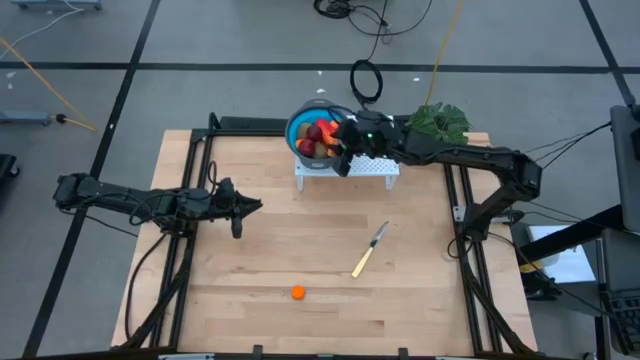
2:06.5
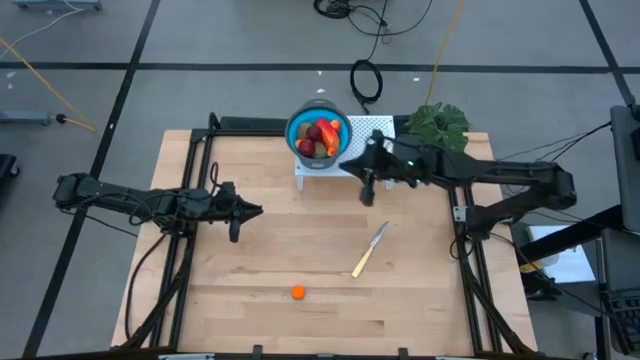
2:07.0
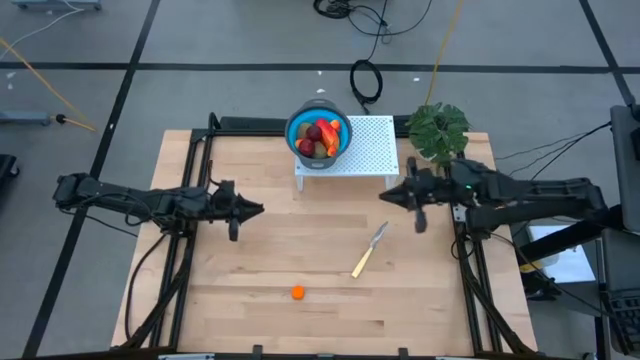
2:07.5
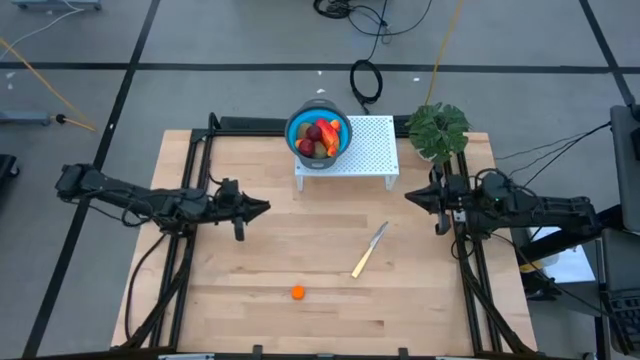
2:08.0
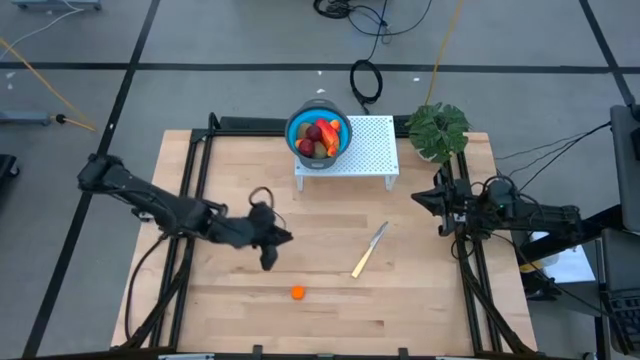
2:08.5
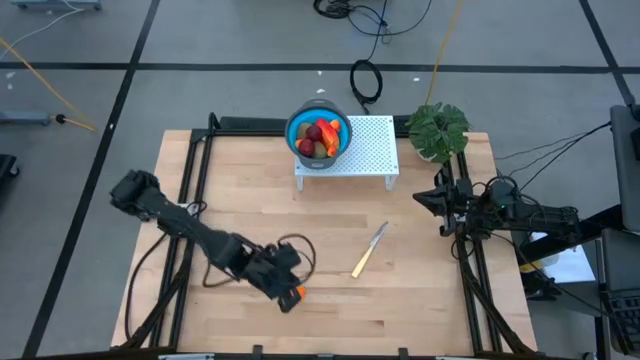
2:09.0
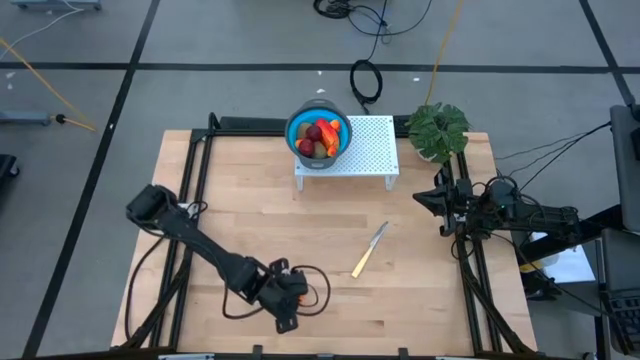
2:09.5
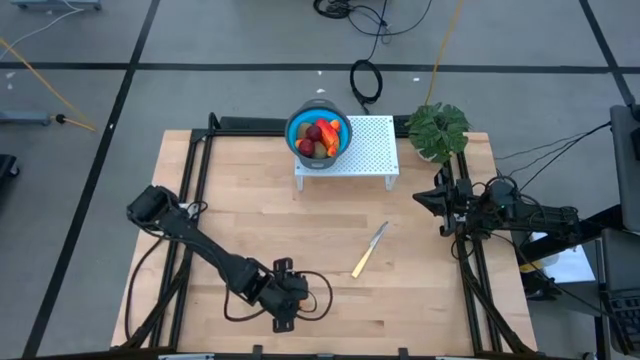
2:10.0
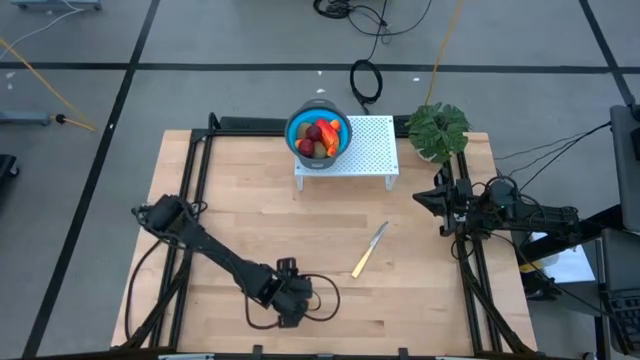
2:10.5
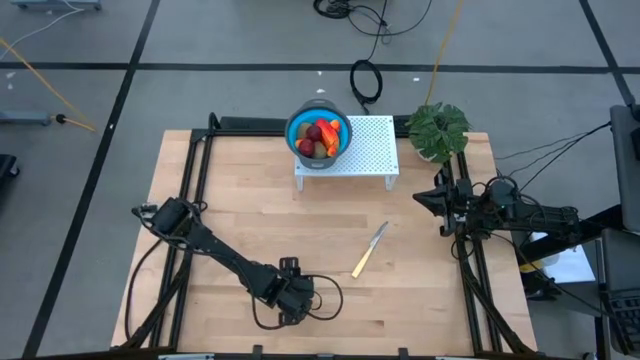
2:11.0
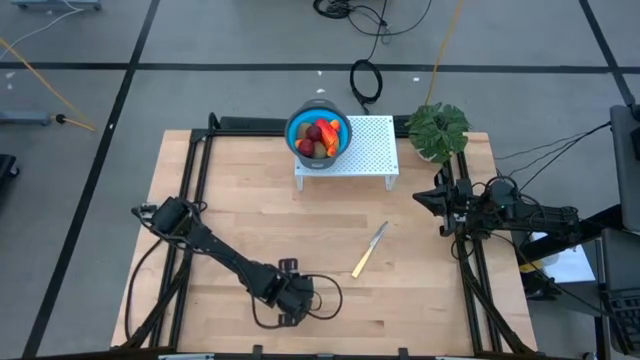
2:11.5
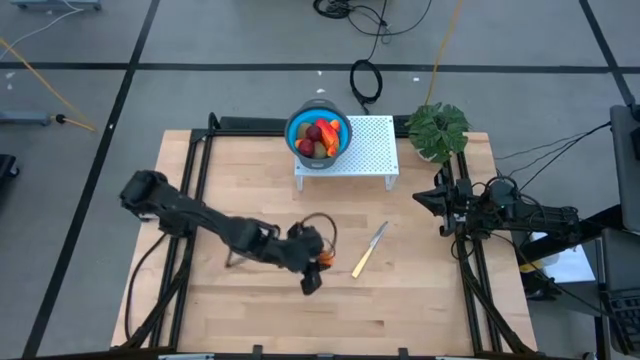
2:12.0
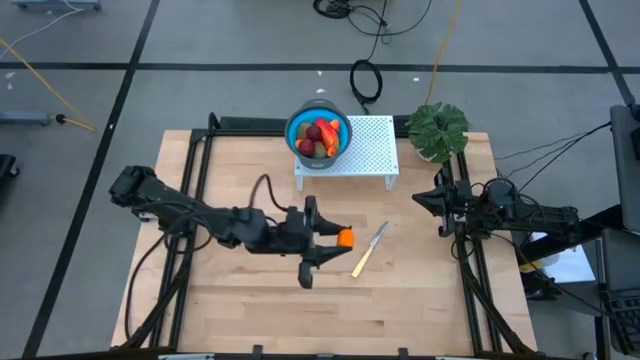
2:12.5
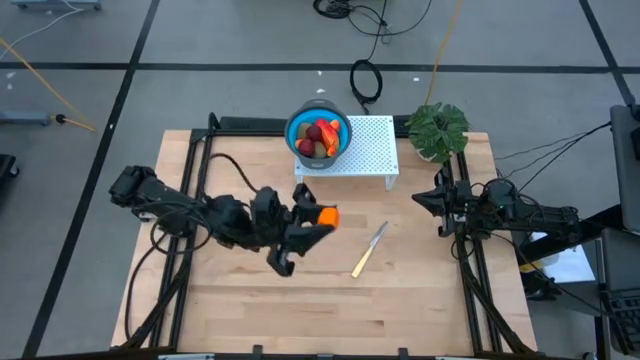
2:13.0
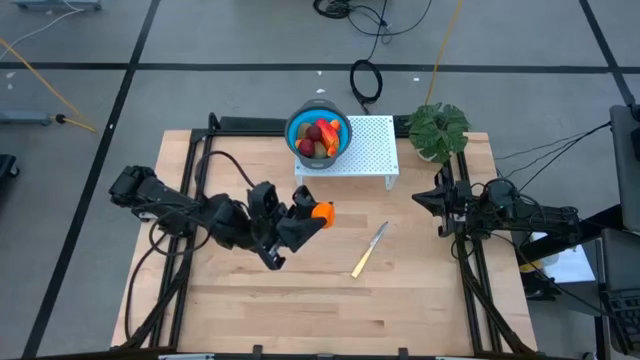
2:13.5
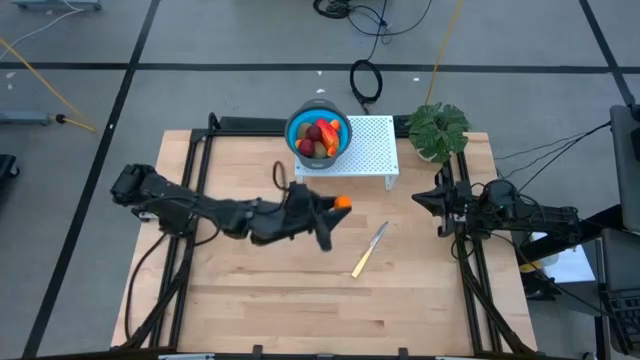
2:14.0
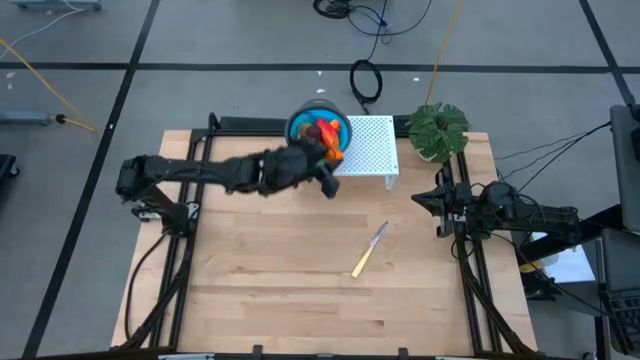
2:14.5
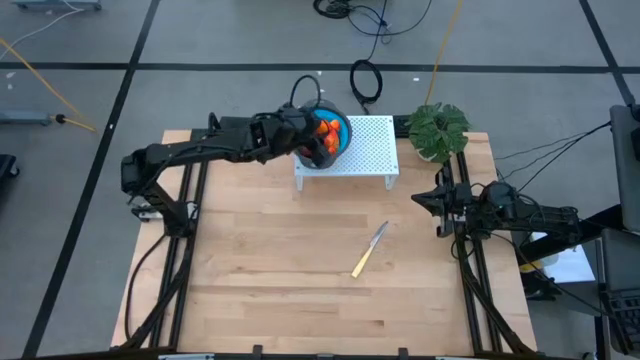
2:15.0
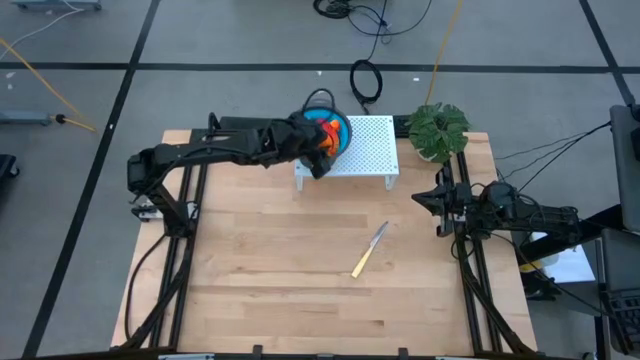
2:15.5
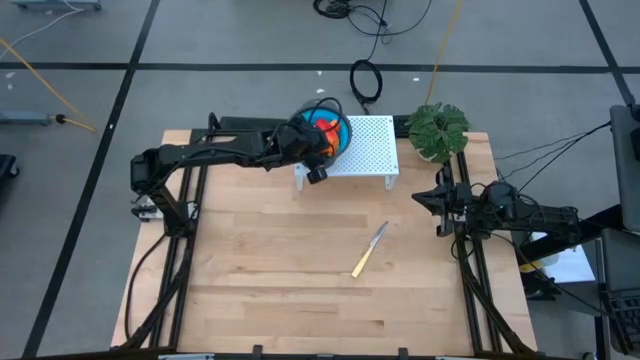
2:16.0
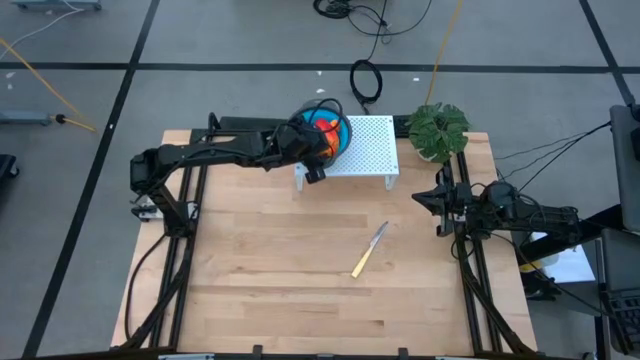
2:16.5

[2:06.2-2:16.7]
Task: Pick & Place Fruit
Put the orange into the blue strainer bowl on the shelf

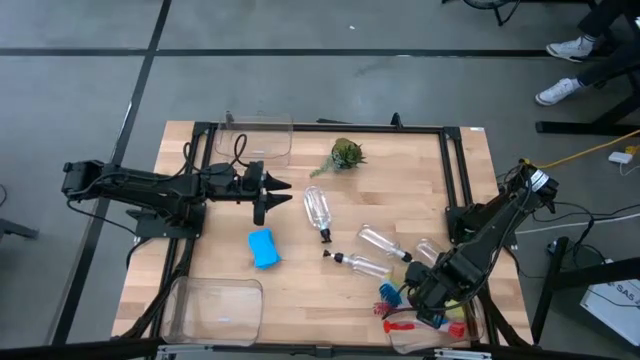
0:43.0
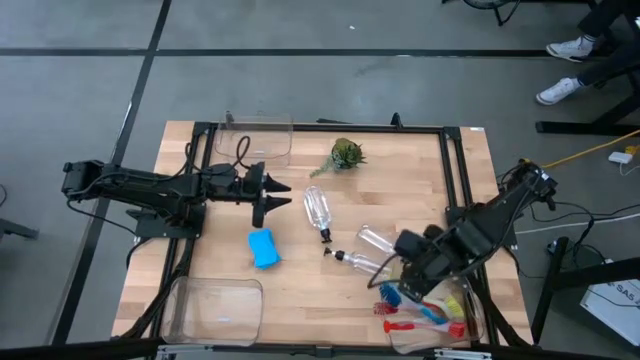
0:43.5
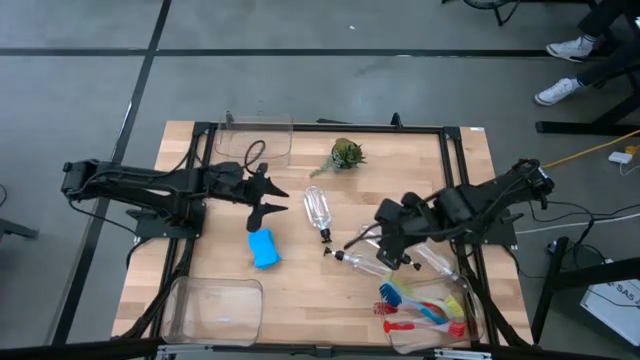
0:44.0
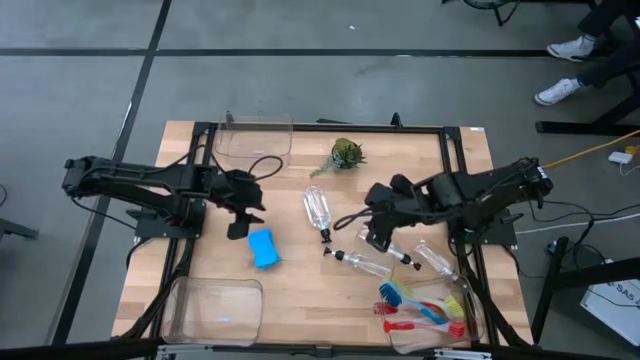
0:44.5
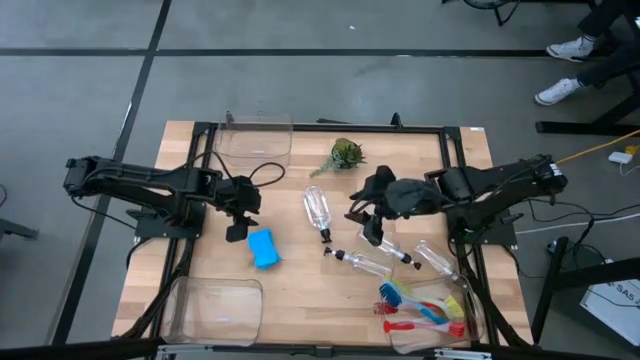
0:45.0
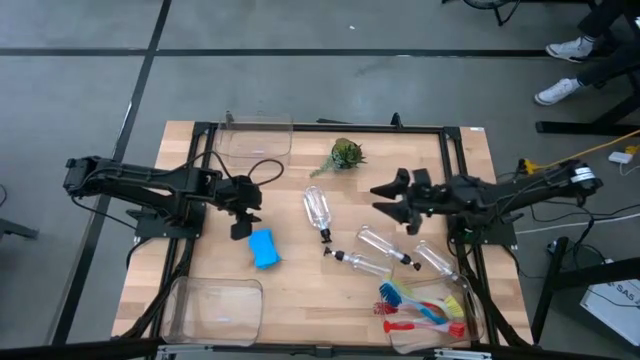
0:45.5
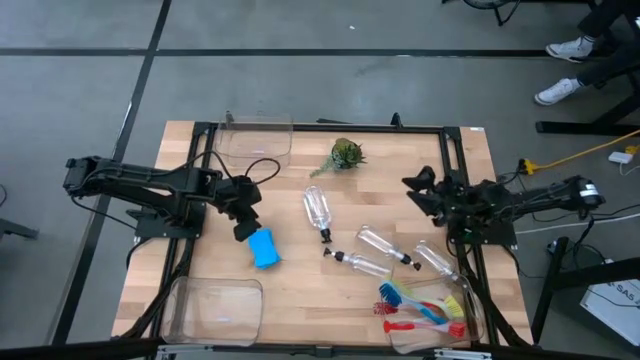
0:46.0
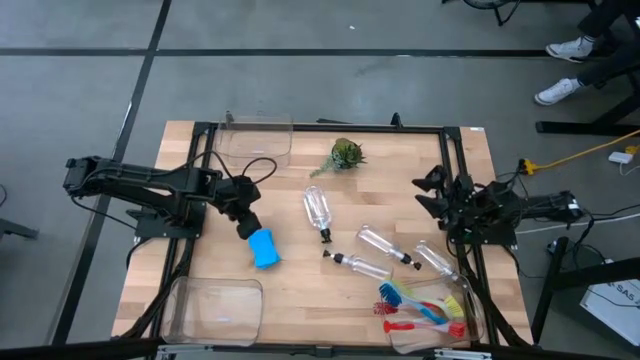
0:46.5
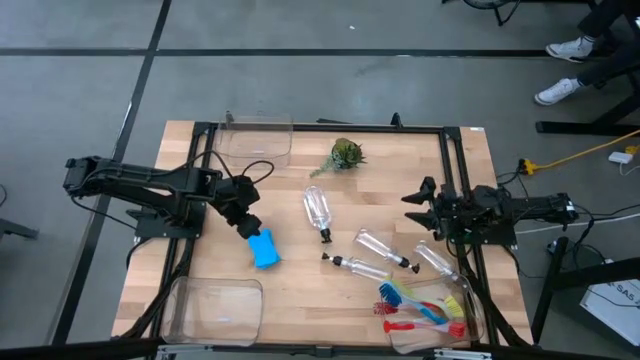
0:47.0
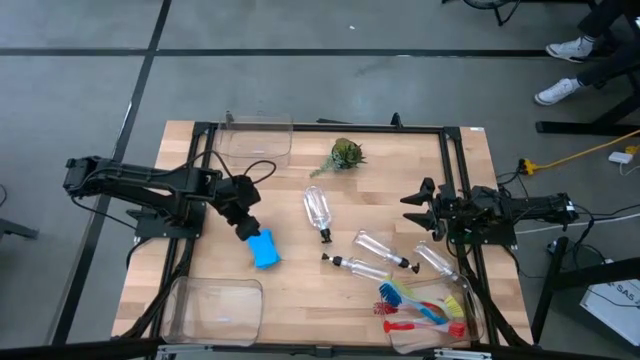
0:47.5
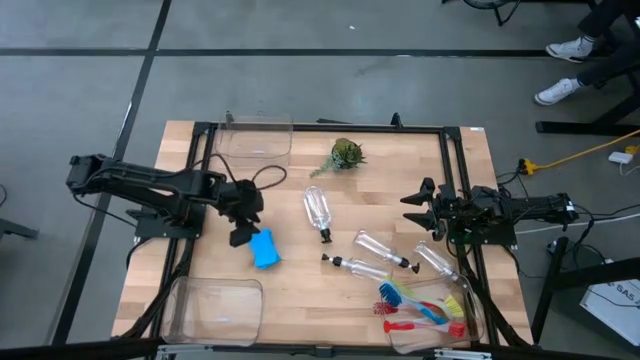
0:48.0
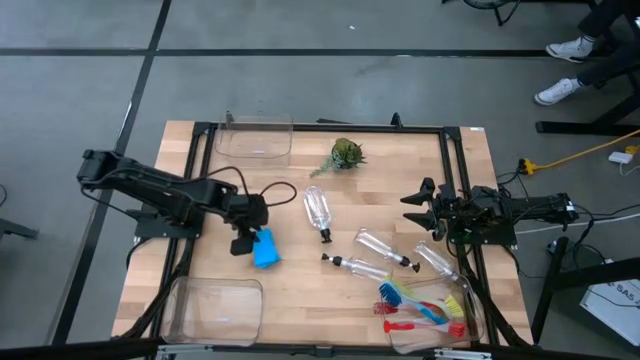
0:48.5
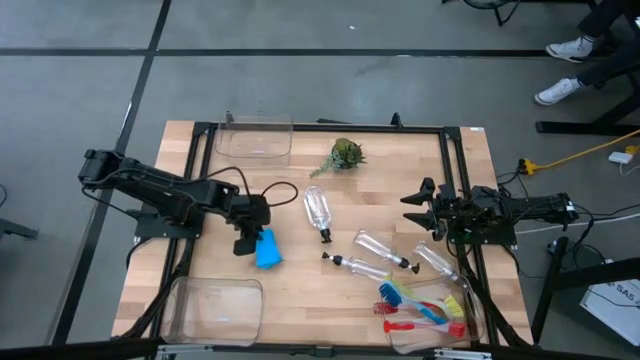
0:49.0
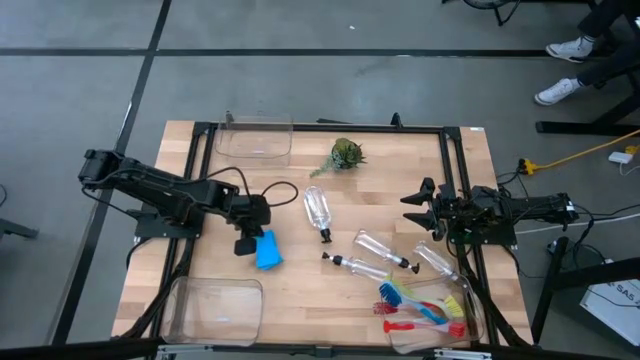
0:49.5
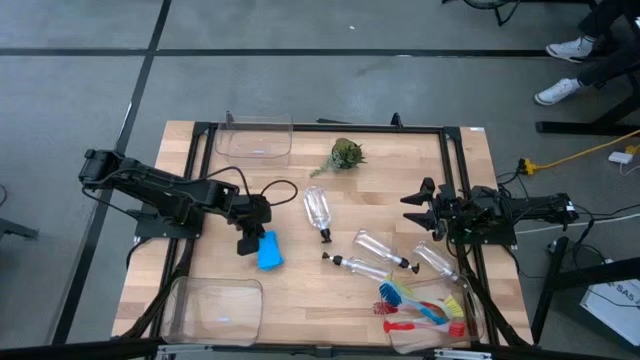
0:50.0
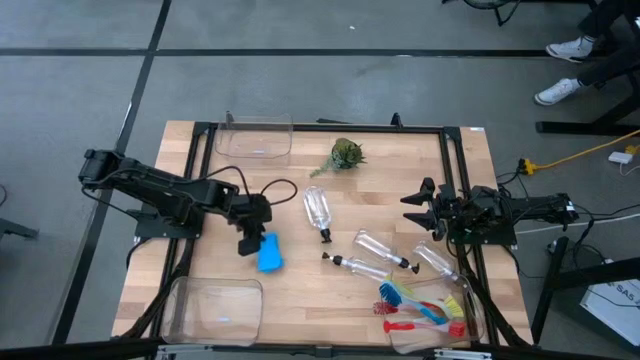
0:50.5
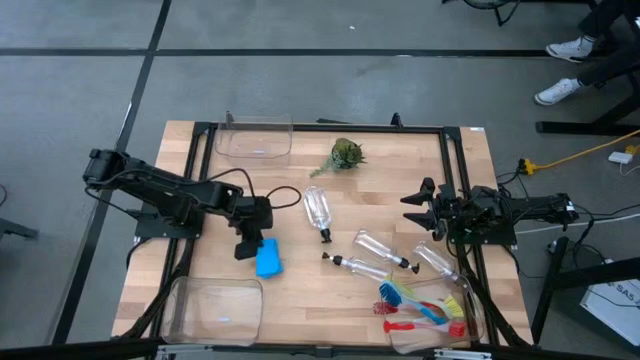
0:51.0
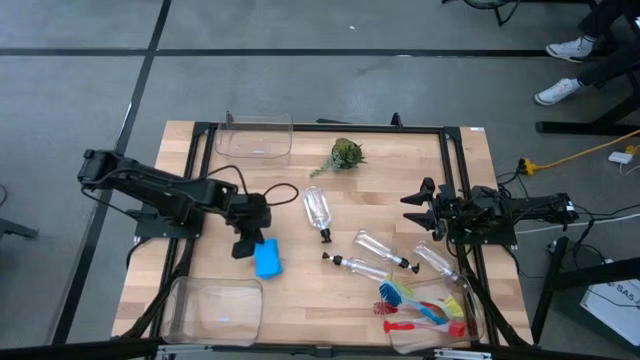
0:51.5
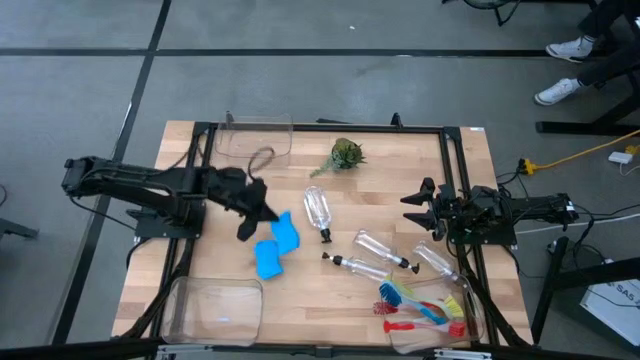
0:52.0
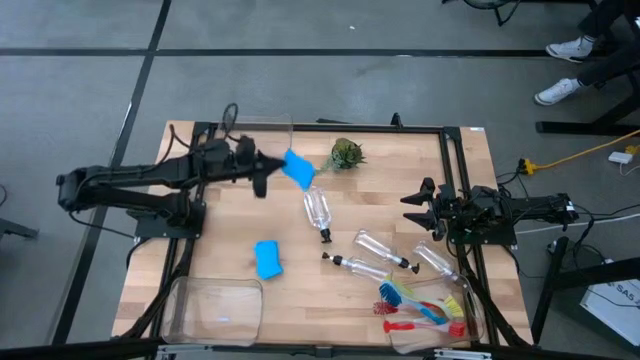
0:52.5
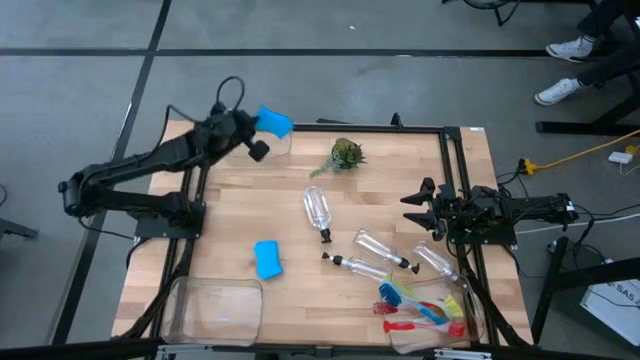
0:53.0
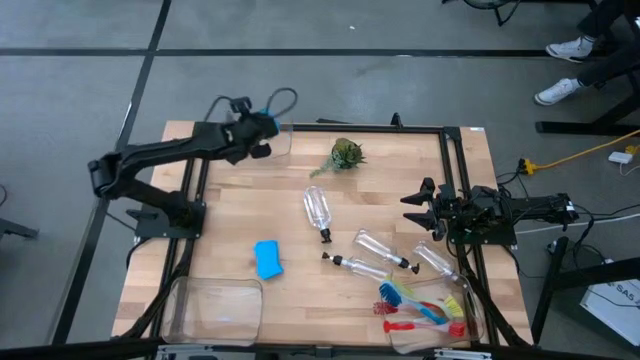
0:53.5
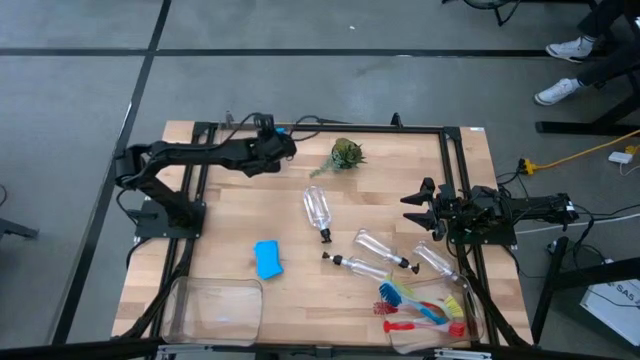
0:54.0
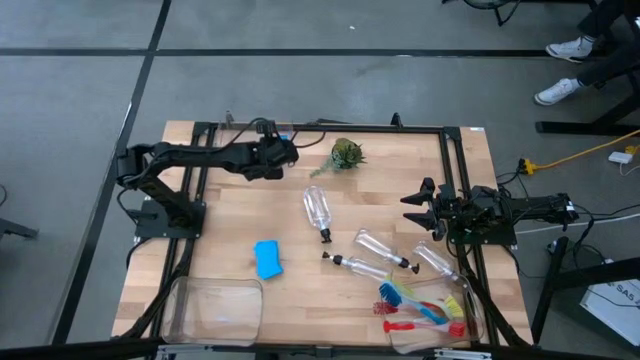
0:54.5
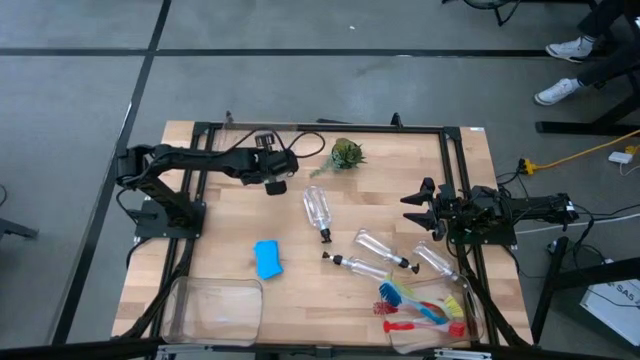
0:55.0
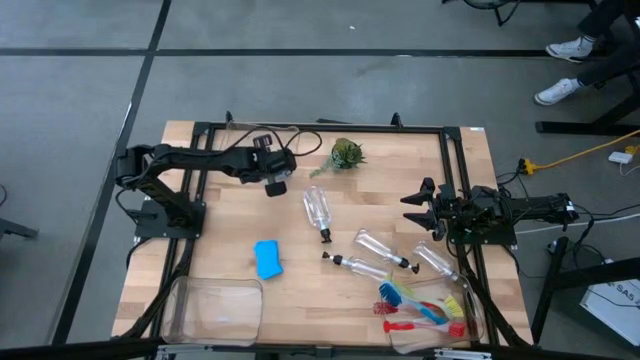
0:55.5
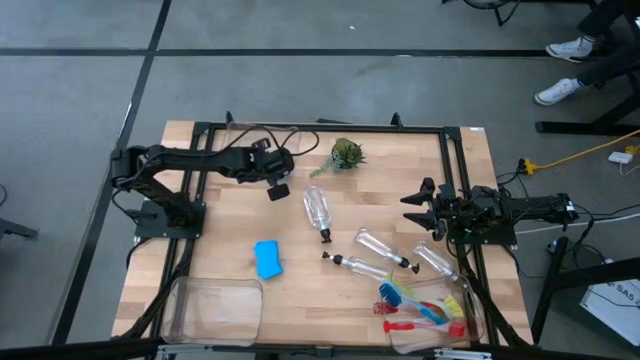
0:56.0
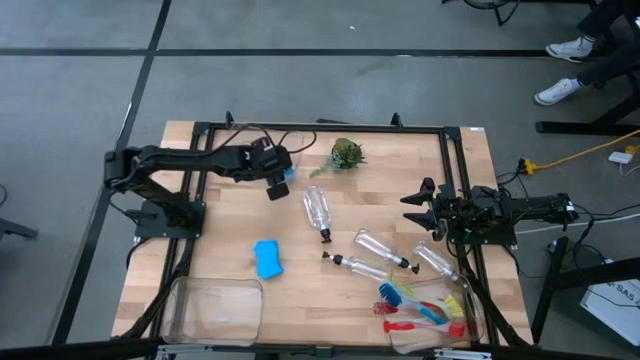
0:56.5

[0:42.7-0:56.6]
Task: Pick & Place Kitchen Sink Supplies
Put the blue sponge into the top transparent bin
